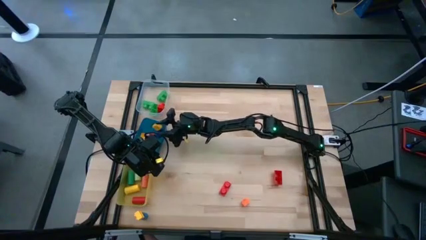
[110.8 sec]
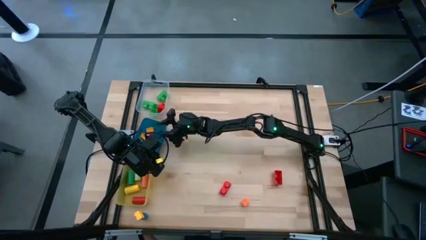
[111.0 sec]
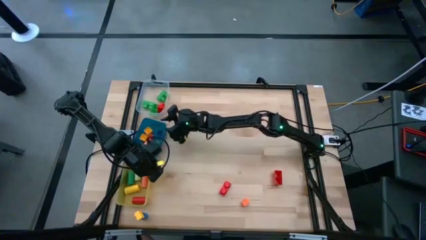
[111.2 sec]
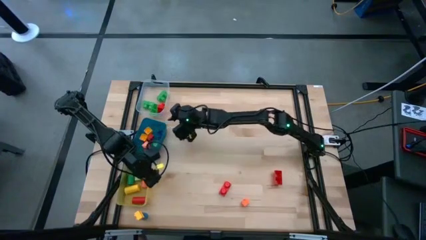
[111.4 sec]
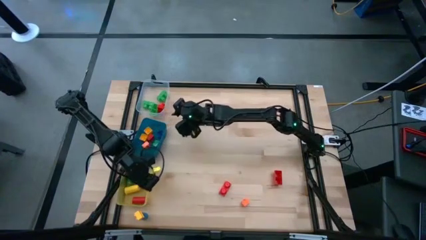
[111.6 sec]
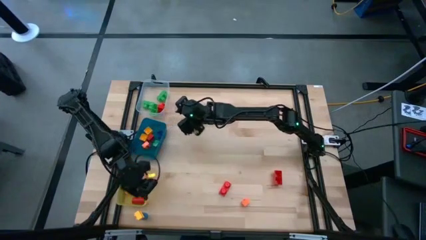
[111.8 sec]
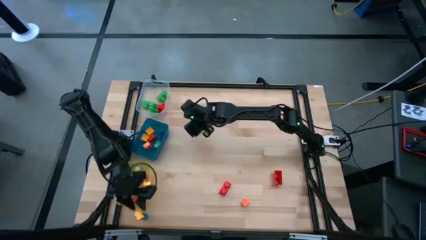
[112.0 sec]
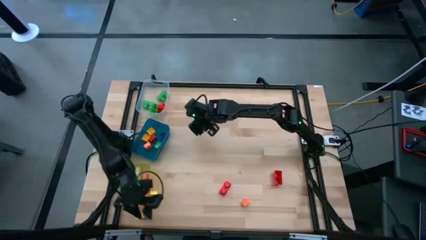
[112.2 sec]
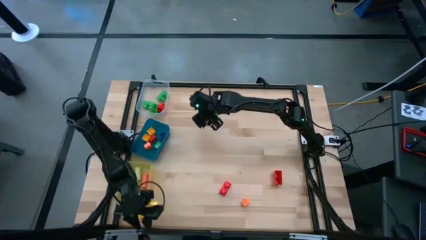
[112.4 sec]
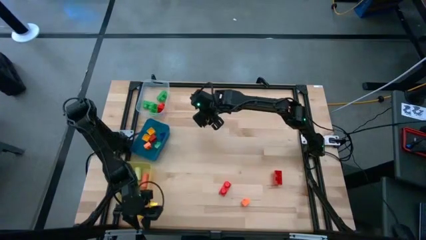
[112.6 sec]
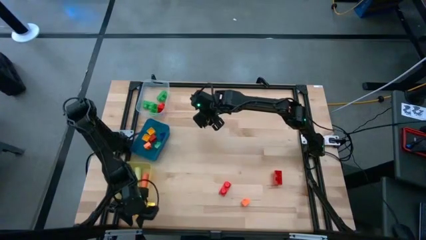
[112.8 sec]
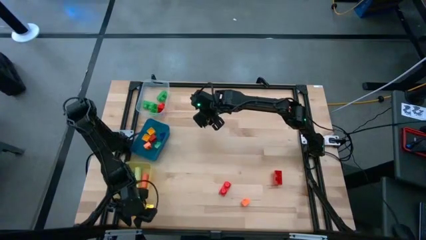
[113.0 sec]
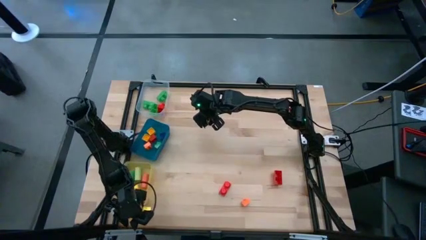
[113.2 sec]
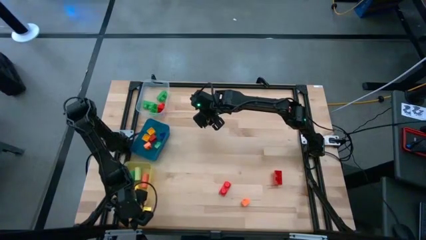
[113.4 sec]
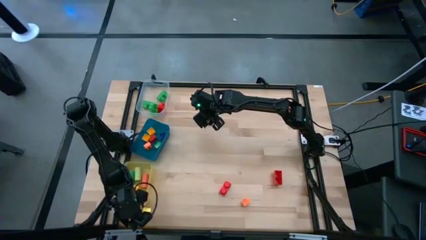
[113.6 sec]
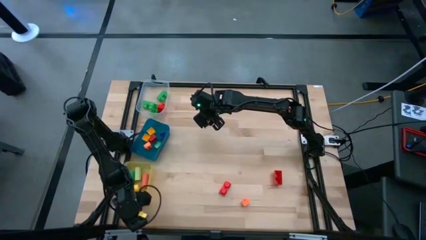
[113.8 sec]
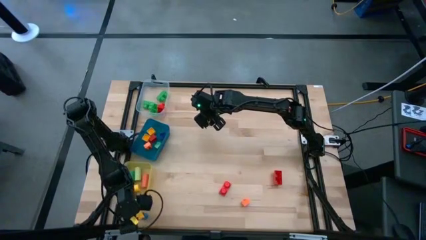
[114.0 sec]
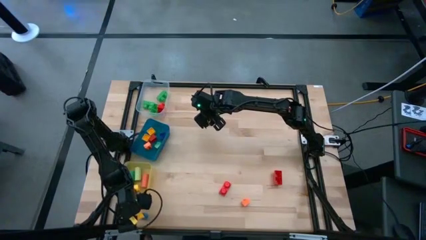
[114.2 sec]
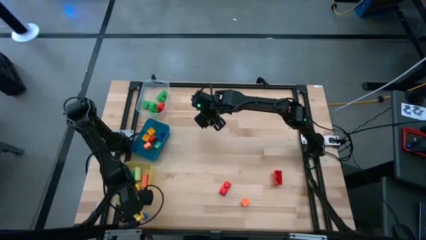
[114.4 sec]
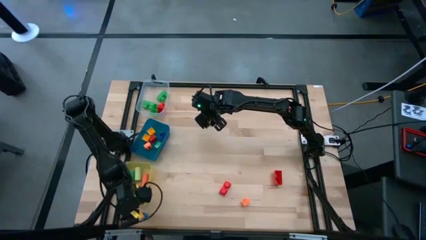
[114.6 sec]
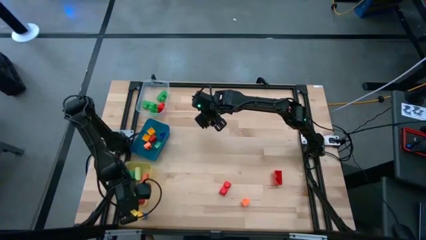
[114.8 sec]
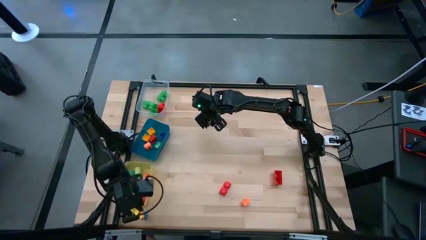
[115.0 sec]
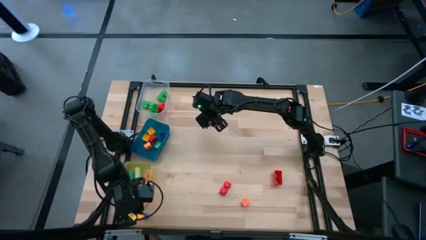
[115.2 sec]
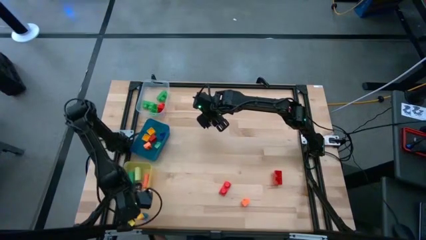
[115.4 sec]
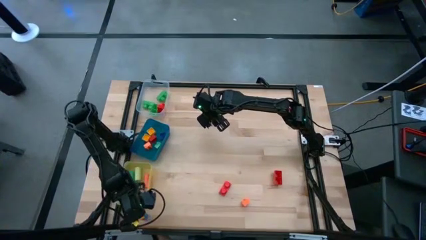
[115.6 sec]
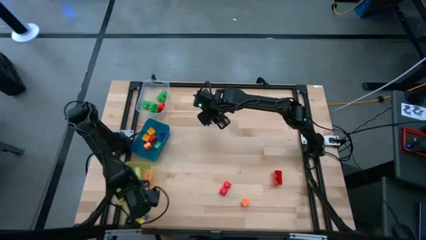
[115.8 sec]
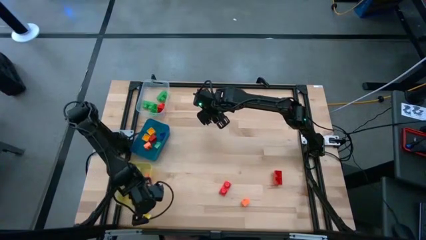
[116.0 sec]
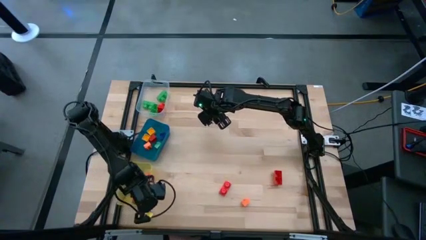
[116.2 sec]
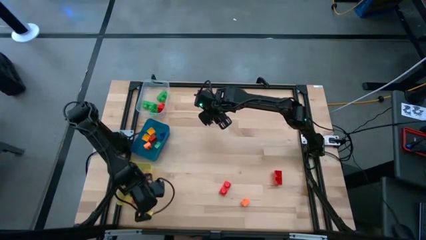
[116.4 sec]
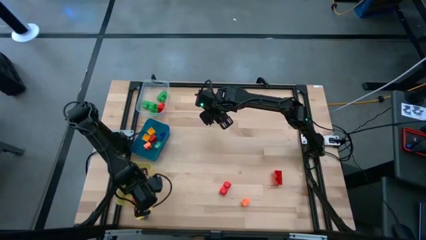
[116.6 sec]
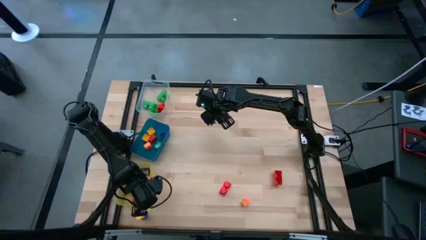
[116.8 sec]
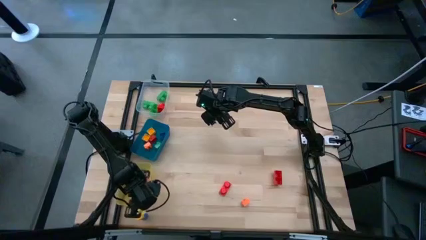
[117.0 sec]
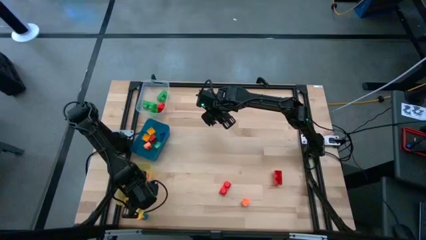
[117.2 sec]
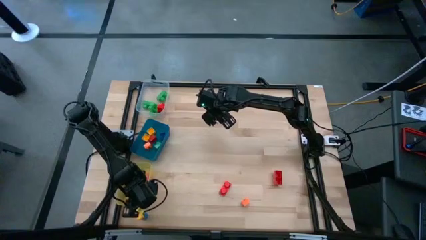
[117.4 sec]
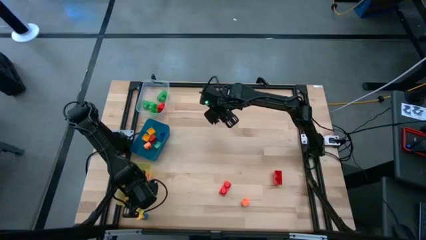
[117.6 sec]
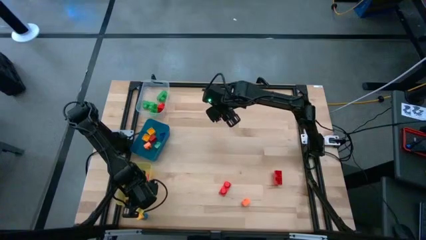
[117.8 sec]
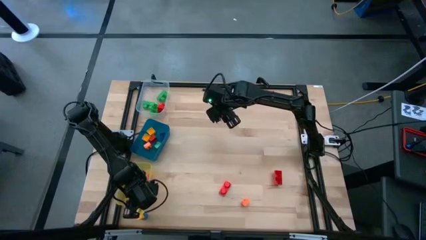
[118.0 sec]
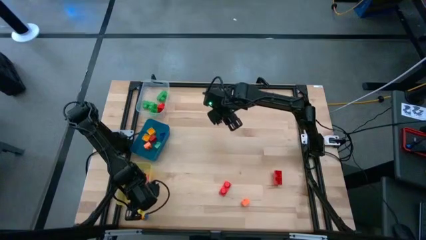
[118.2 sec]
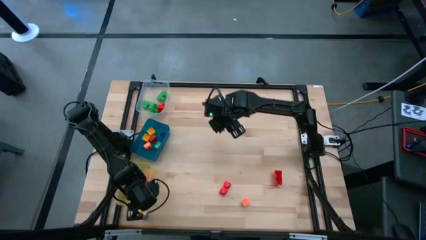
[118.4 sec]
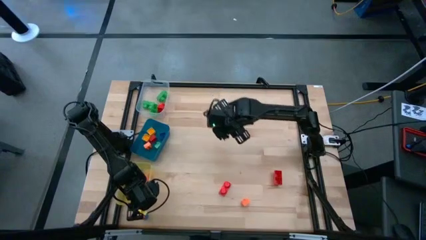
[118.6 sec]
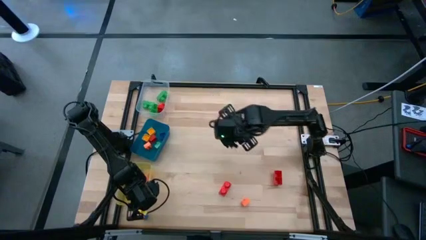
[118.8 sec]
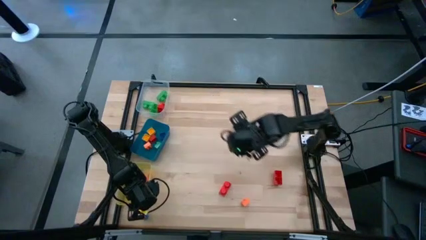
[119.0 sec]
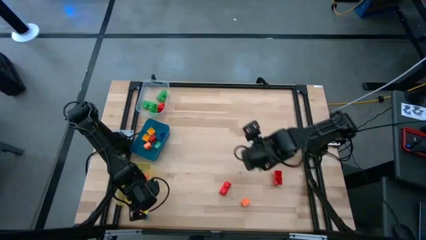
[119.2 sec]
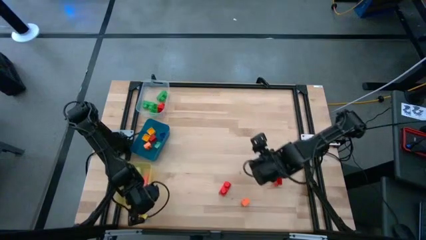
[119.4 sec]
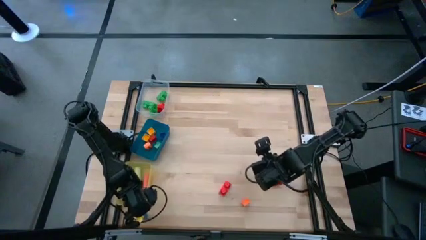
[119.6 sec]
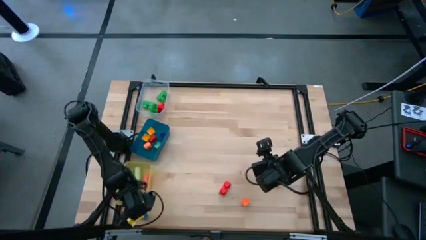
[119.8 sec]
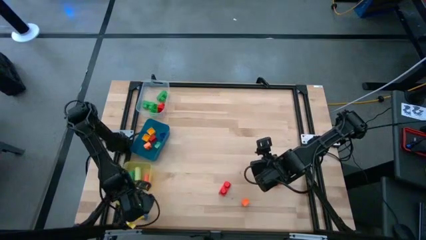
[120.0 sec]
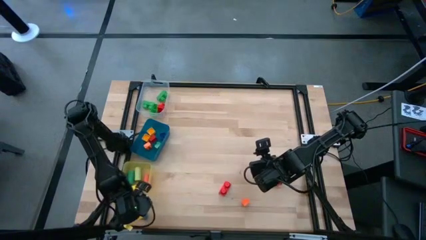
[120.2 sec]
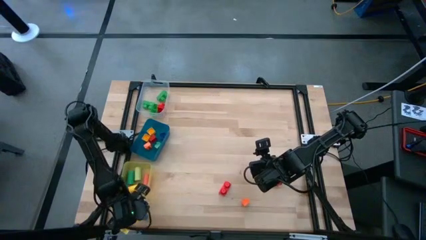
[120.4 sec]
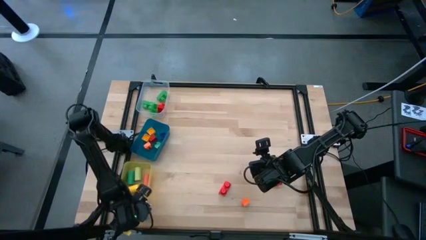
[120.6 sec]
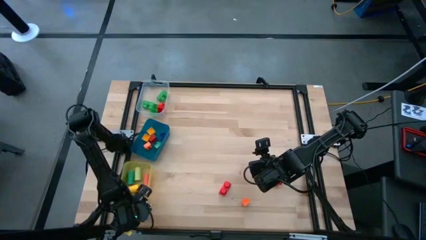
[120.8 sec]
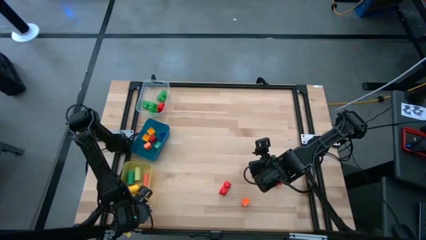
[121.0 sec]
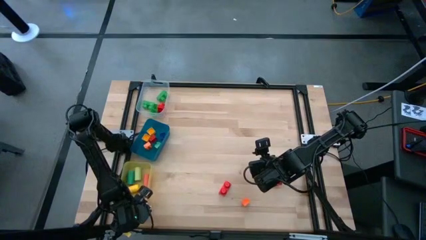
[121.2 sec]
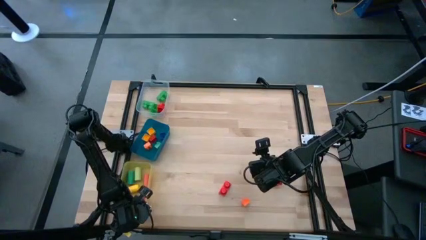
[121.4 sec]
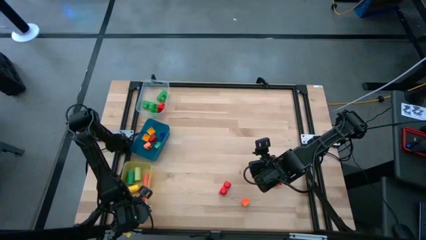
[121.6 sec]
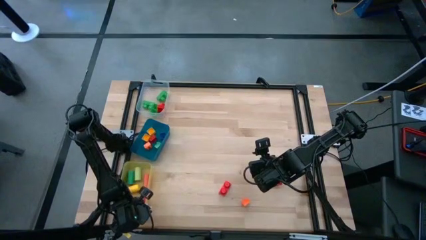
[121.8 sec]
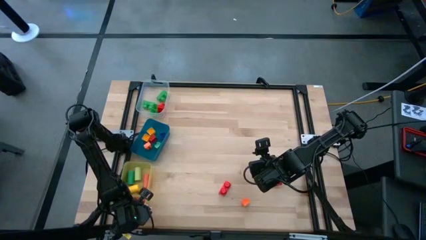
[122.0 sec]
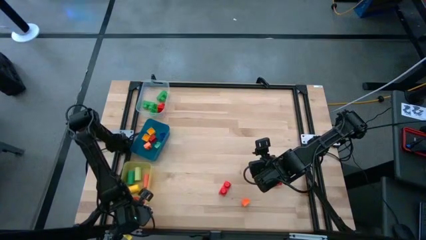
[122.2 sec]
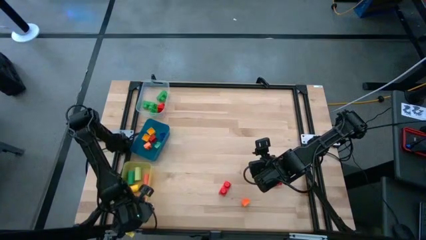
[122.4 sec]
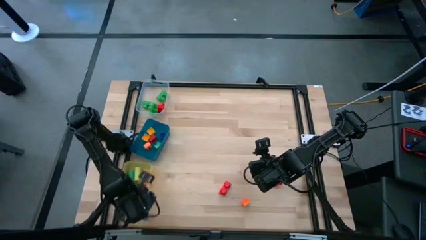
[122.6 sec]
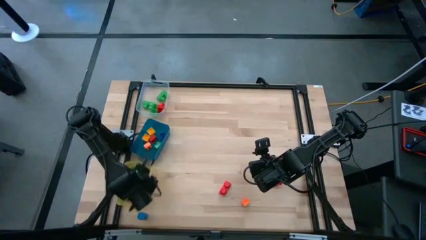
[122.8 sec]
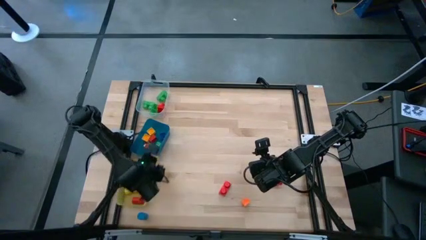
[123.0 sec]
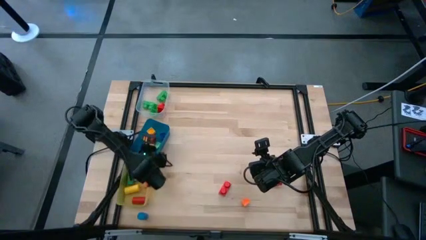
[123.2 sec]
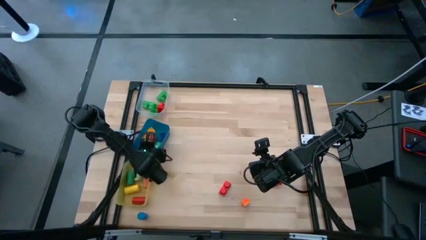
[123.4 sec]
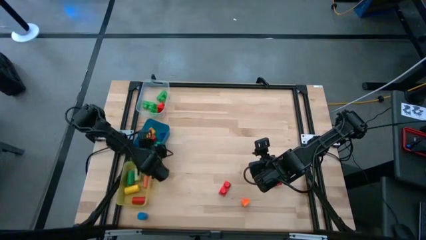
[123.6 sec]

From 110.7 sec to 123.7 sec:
Task: Sort blocks by size
Put the yellow 4 stud game piece into the blue bin

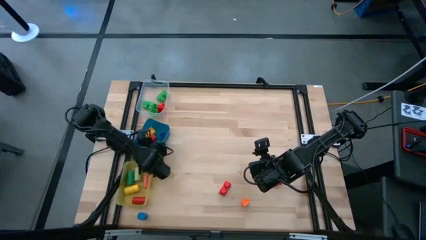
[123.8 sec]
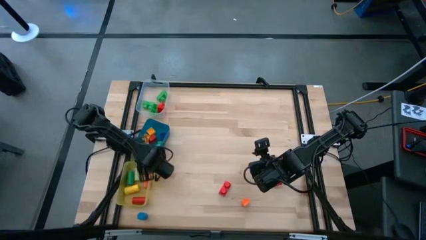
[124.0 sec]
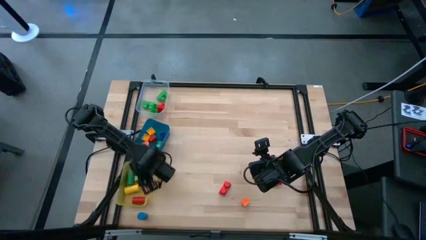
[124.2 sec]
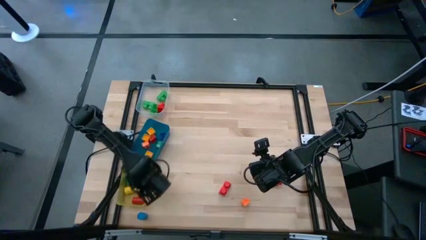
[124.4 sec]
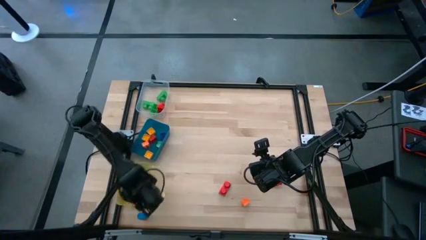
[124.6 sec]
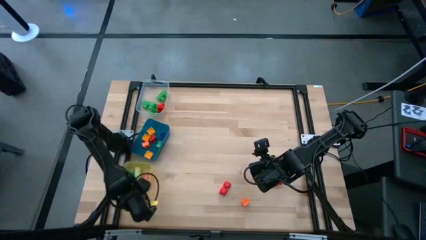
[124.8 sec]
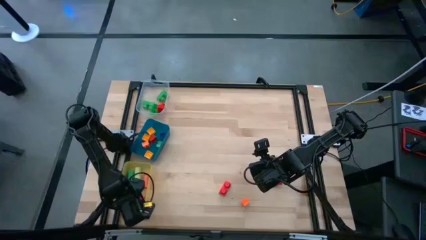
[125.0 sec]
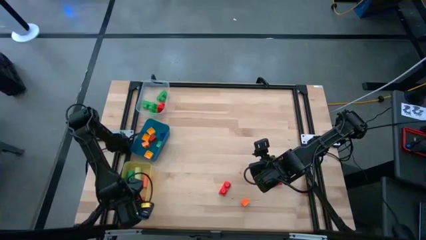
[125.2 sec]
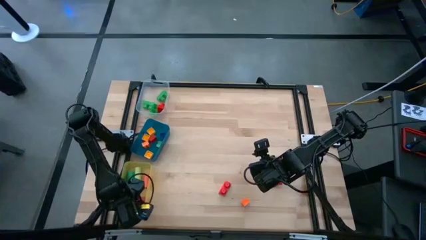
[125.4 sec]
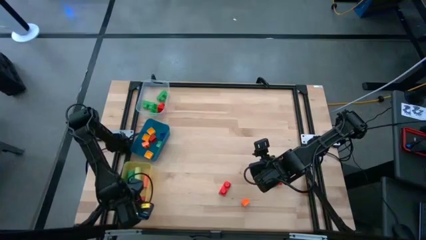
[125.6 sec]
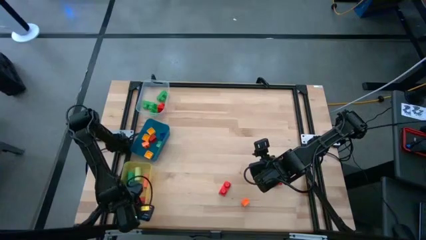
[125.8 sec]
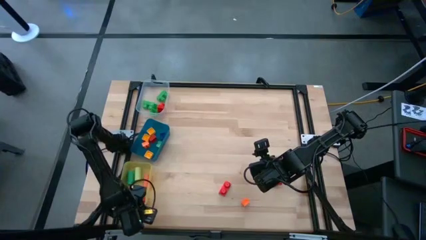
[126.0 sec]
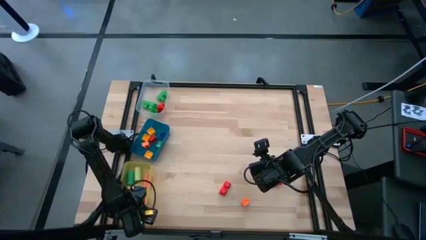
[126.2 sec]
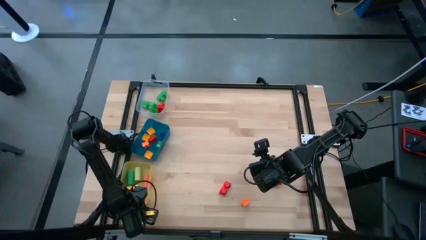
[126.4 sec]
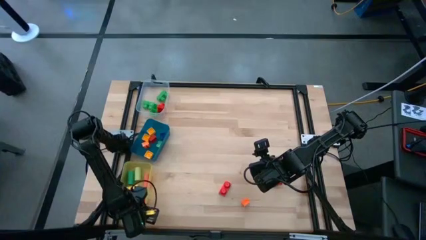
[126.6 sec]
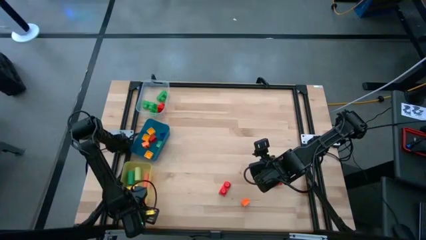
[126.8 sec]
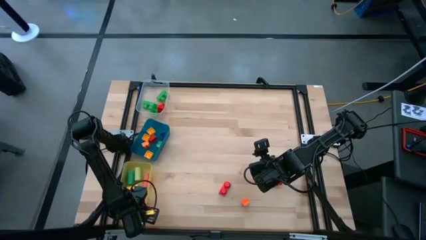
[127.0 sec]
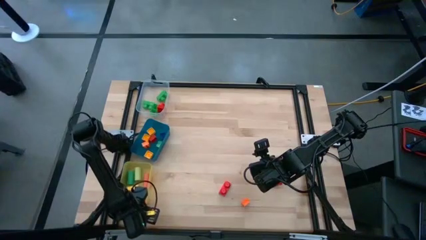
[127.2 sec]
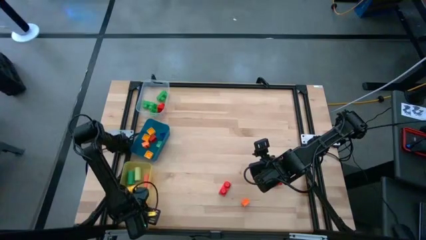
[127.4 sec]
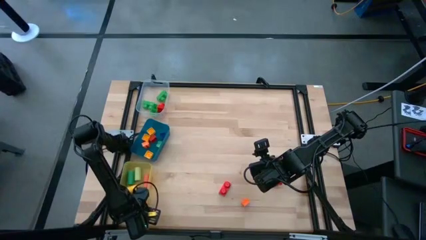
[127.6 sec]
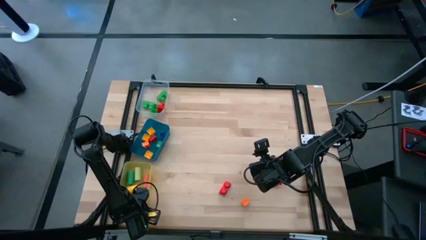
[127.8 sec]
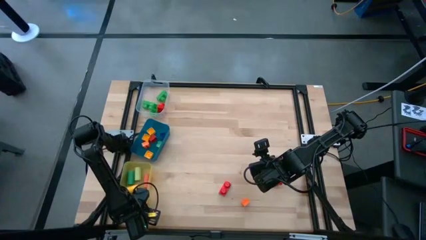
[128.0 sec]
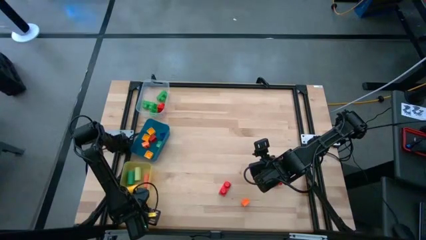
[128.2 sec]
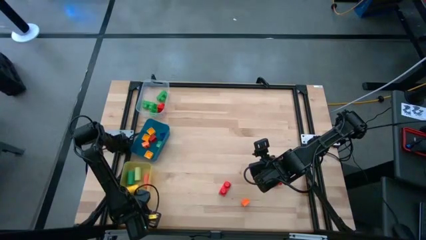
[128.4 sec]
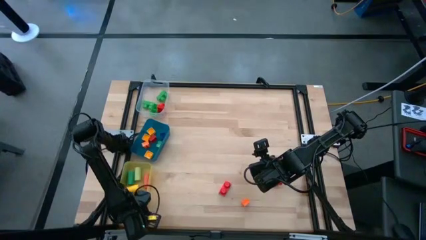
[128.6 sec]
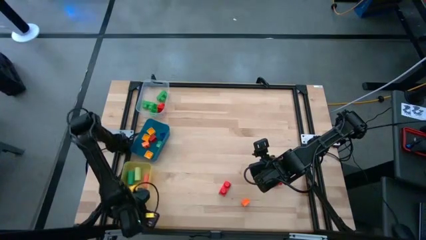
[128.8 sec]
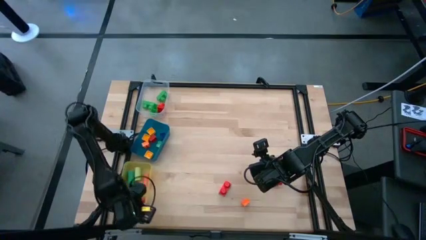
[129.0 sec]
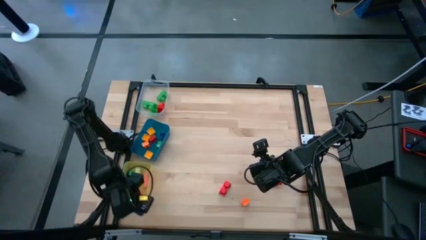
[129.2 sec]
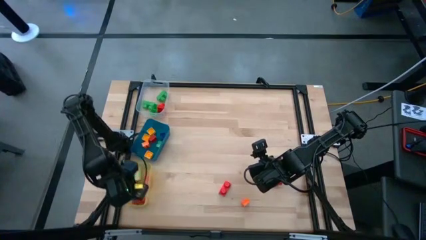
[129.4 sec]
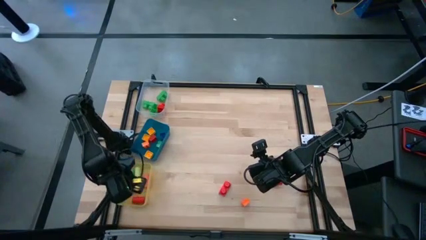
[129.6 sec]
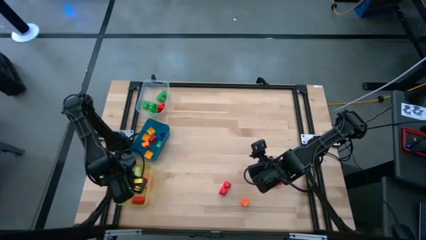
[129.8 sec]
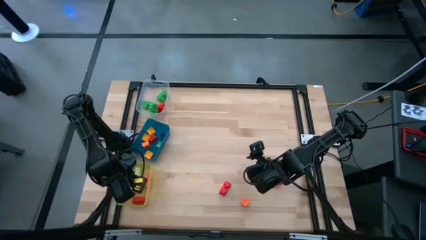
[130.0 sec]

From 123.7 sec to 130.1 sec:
Put the blue cylindrical block into the yellow bin
